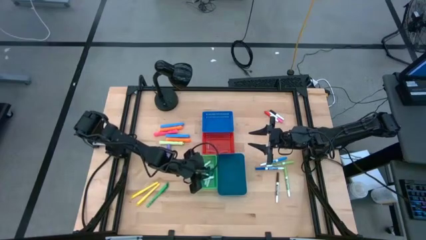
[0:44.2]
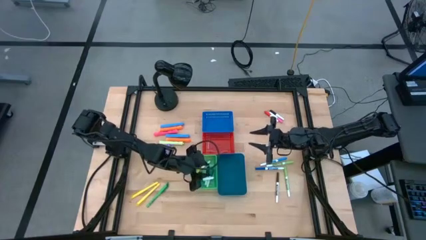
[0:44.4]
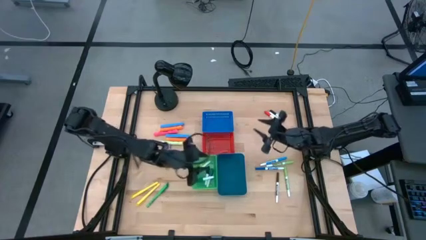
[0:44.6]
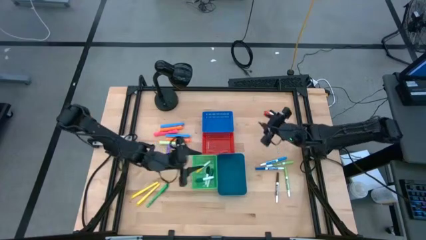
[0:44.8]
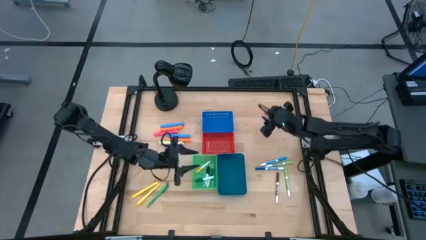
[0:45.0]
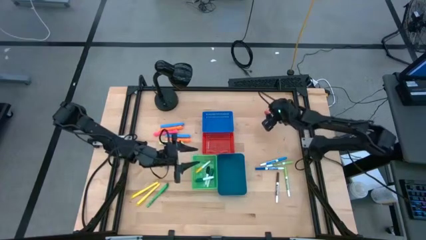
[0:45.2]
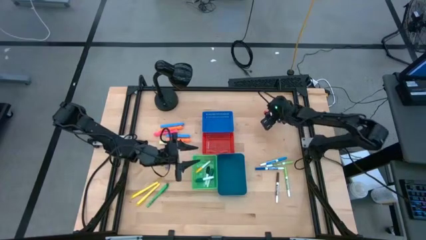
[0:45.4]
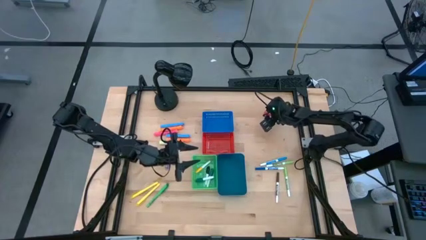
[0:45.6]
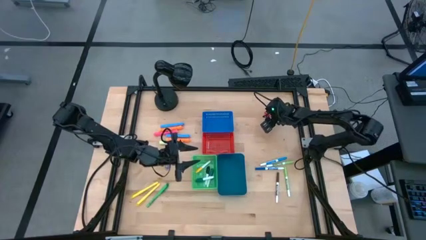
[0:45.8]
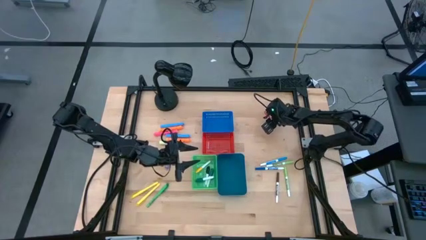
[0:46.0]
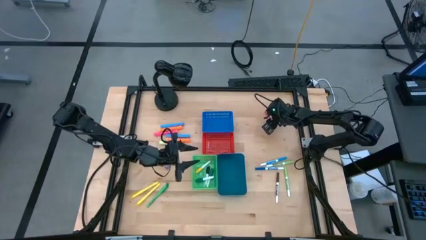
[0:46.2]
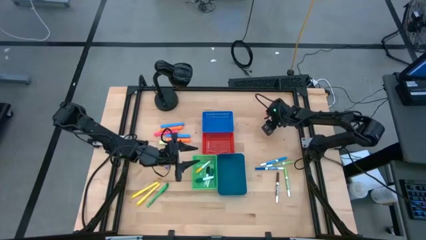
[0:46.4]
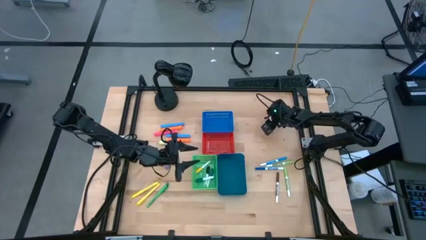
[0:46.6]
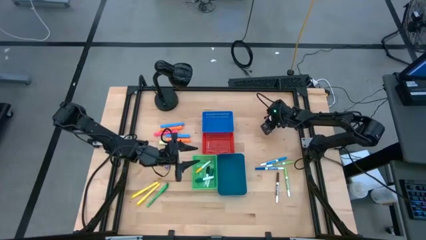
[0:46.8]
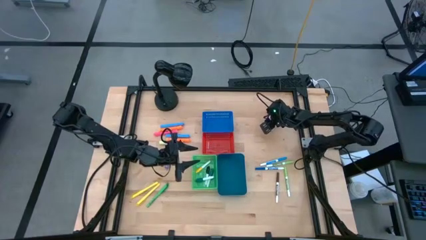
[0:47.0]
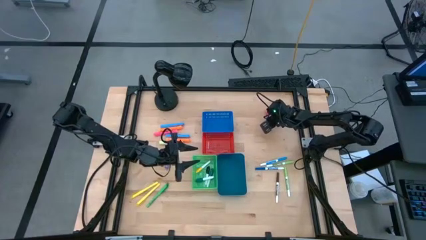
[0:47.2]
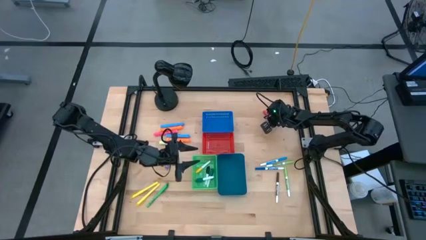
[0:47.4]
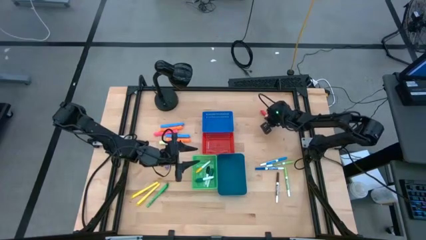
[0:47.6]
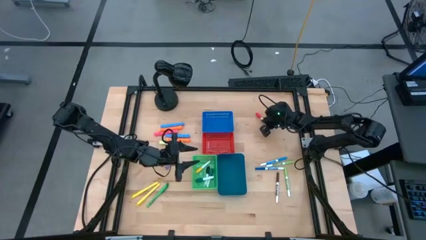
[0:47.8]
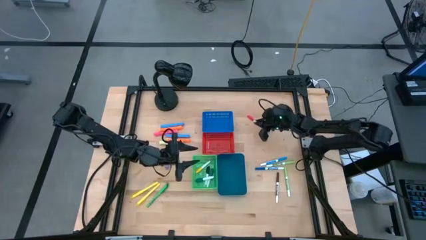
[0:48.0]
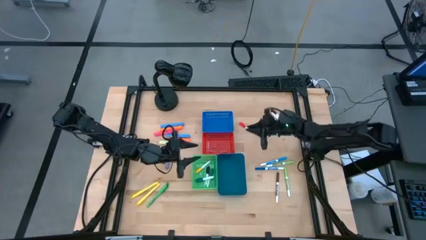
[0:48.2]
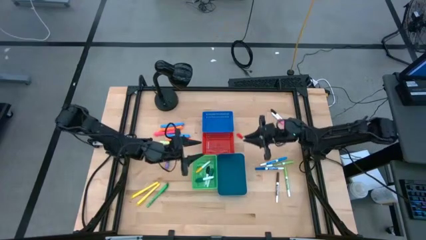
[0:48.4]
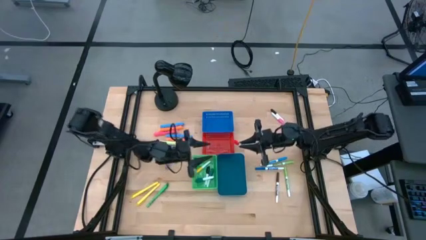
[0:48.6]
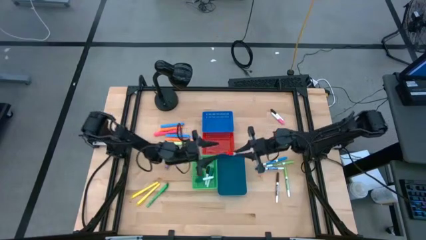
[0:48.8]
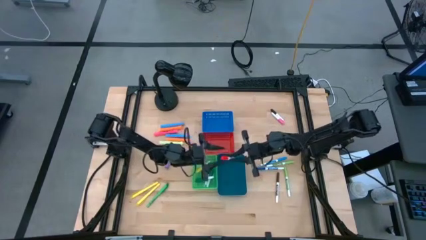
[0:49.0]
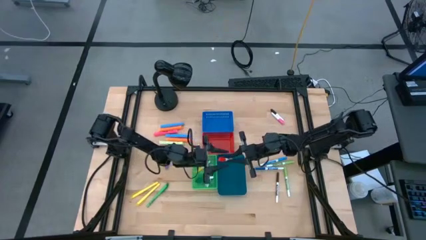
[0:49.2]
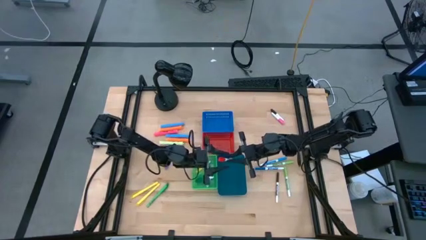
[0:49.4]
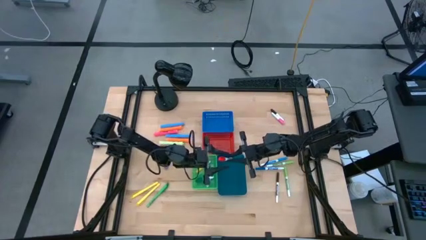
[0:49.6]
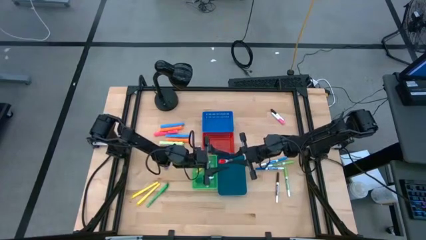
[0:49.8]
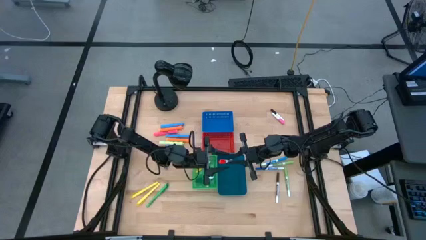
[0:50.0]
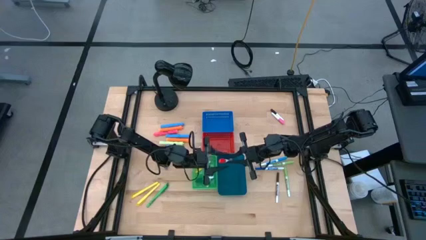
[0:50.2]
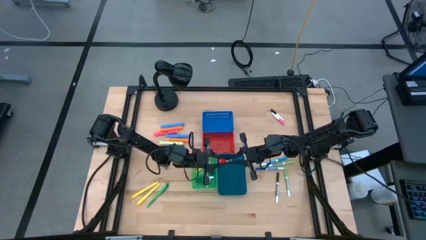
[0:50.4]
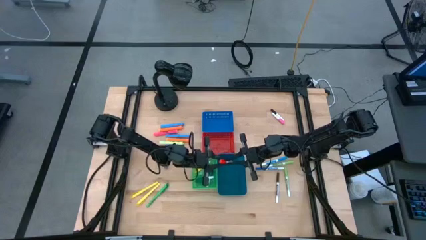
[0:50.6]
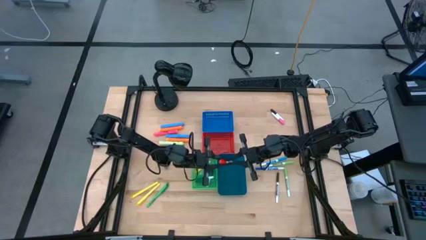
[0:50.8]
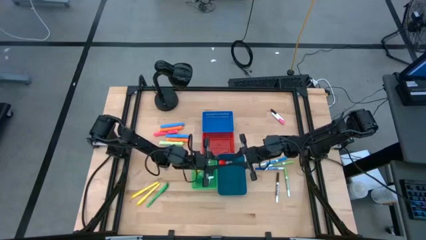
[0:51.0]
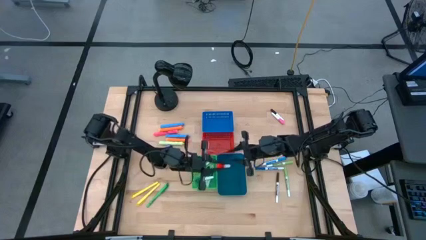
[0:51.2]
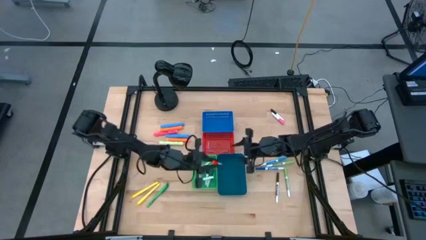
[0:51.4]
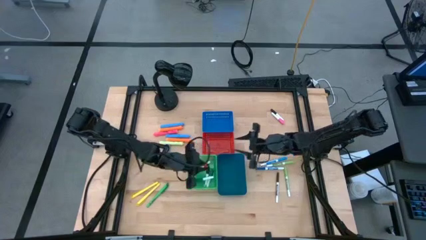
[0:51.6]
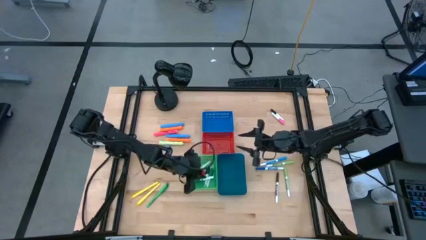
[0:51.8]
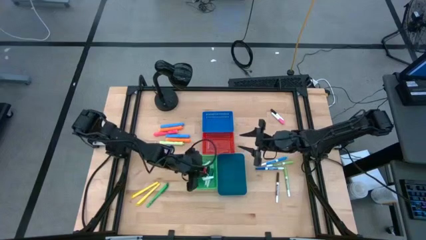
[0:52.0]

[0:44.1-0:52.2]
Task: Pick & Place Markers
Put the small red highlighter pen into the green bin

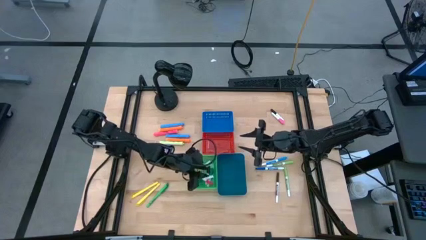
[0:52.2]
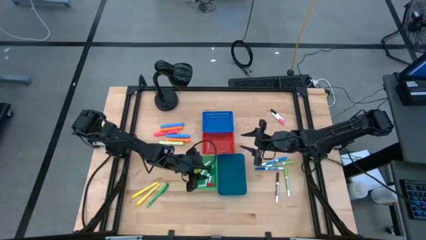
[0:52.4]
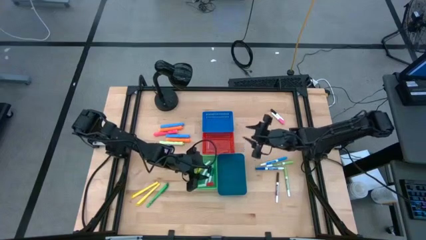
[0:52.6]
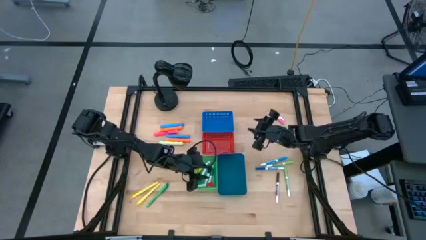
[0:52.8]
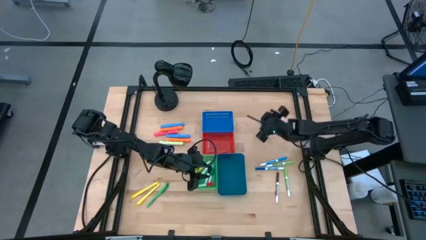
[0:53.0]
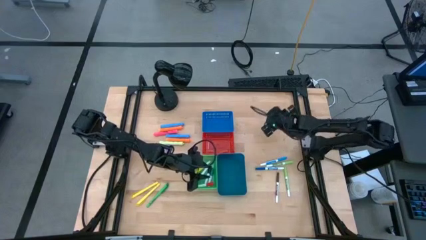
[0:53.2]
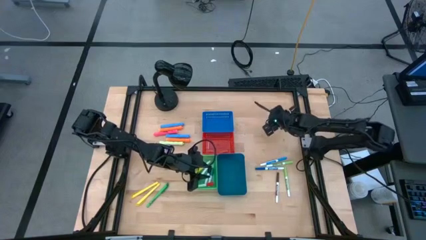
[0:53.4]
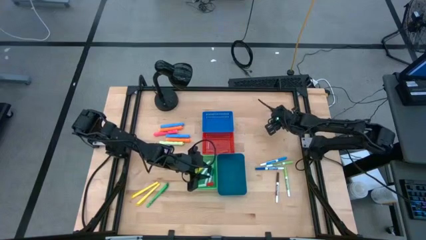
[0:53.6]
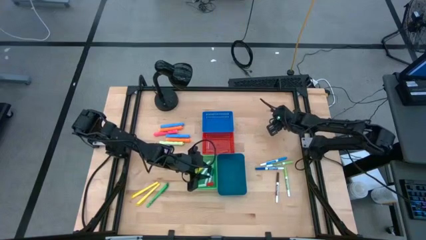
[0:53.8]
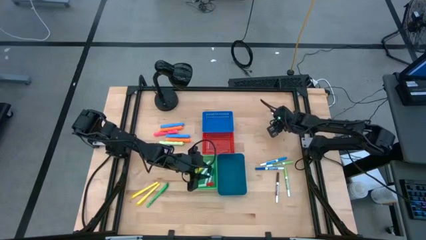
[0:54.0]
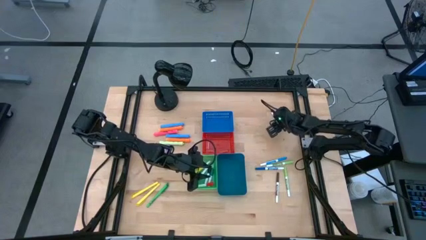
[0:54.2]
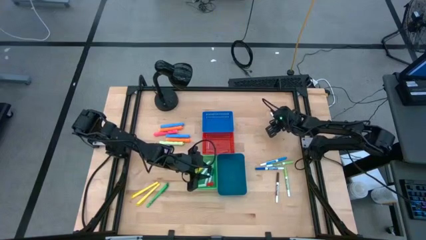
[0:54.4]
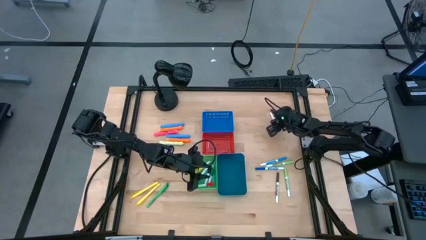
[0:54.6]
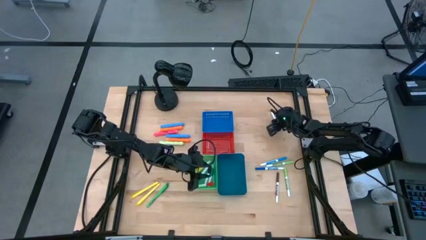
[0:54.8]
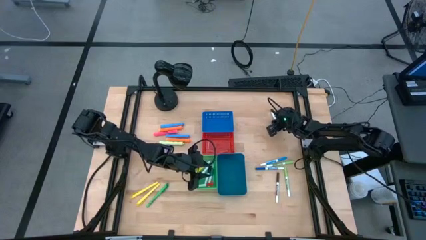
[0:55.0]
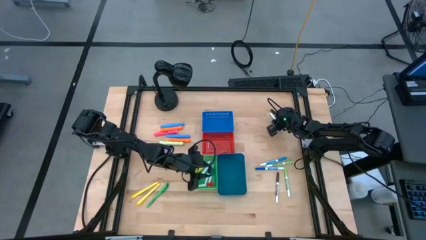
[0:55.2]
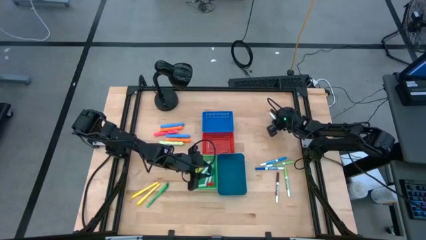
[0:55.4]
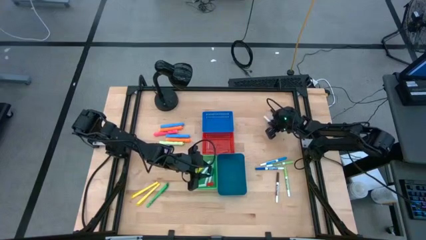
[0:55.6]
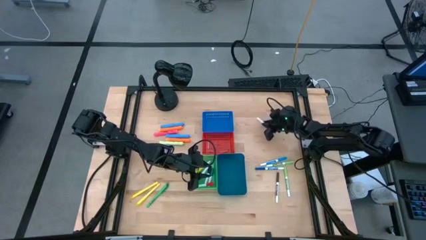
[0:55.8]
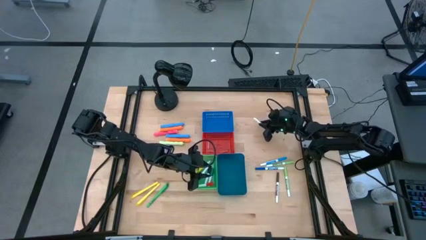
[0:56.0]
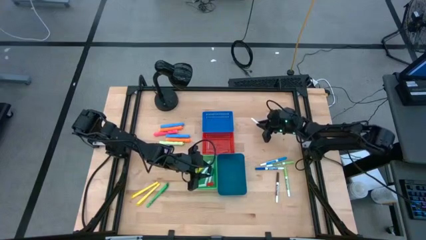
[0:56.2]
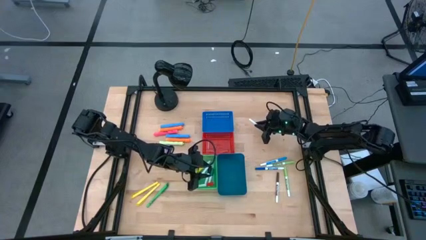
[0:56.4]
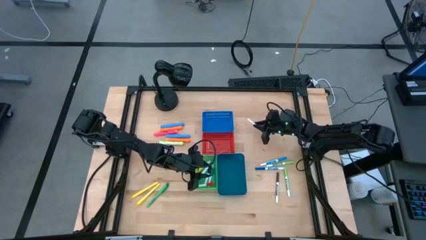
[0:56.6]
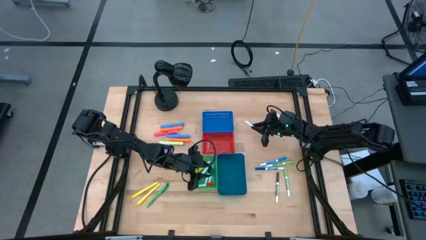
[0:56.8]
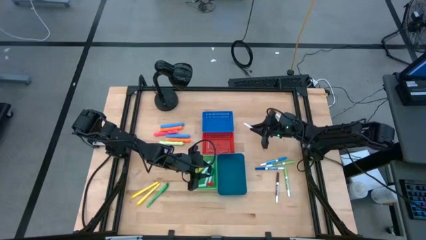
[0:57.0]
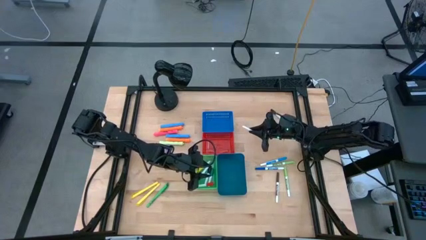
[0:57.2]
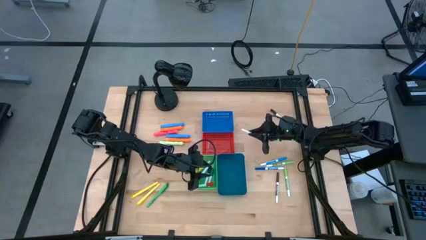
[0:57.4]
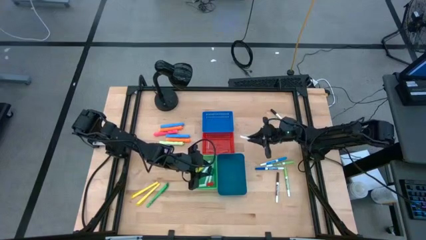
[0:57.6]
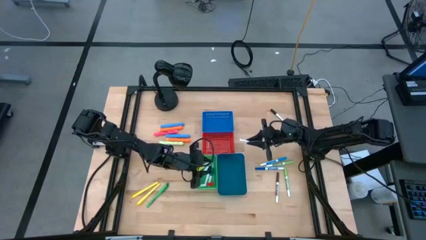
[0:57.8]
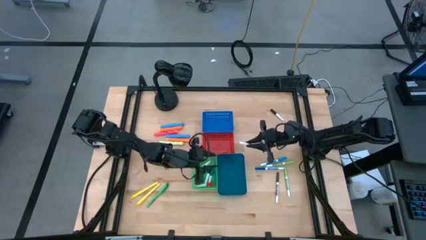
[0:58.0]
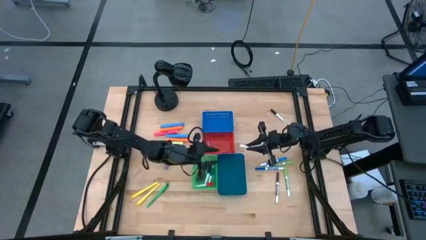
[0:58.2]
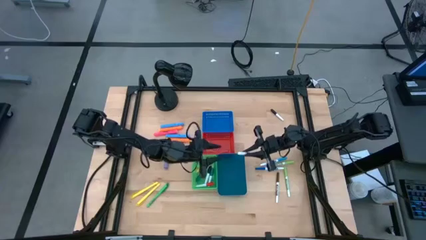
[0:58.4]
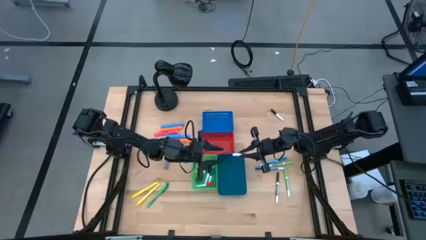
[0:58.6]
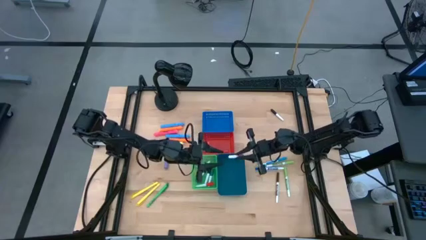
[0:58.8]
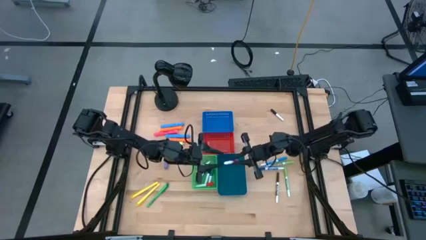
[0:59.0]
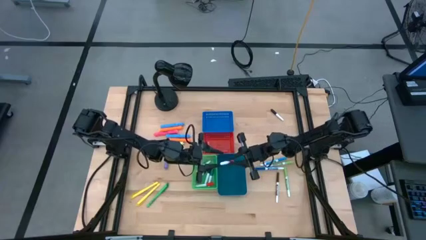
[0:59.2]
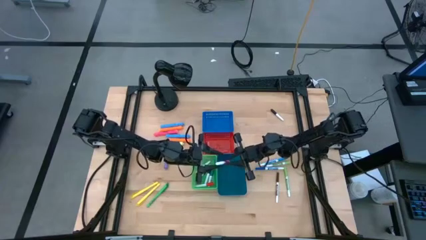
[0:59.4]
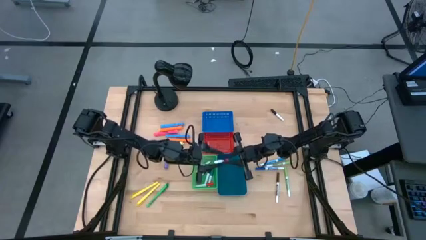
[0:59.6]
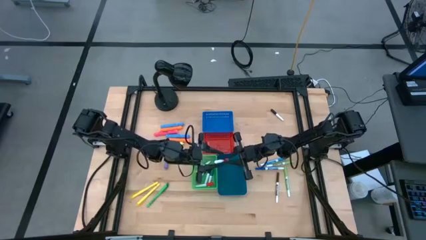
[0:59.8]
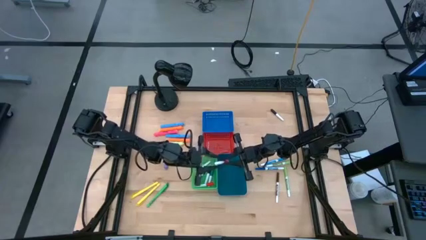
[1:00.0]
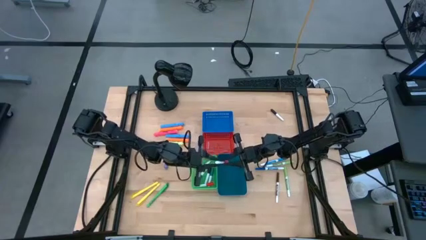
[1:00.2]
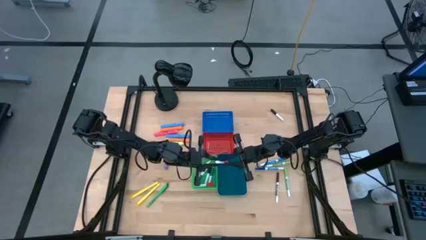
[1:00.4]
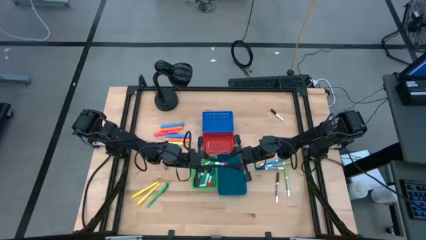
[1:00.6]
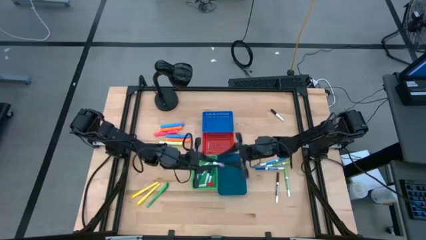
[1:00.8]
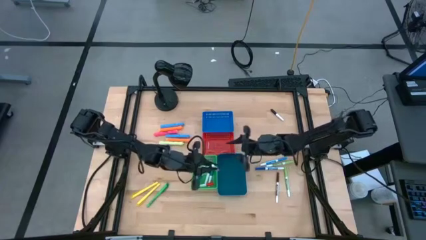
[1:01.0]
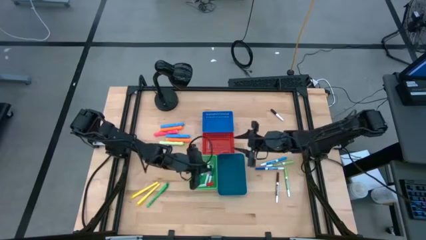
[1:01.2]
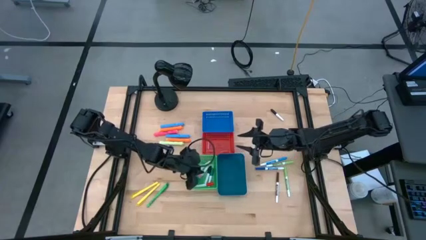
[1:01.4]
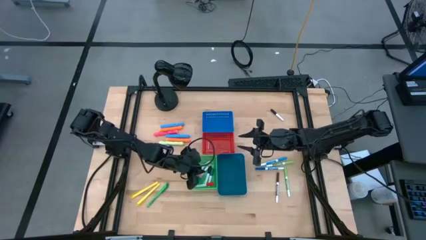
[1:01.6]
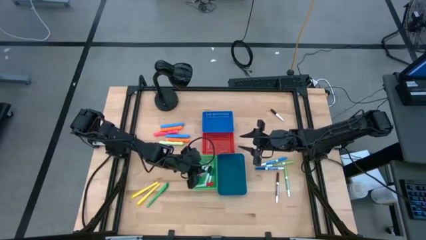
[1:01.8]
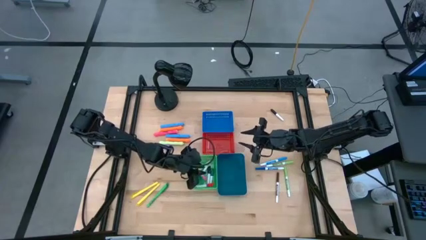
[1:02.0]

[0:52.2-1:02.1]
Put the small pink highlighter pen into the green bin
